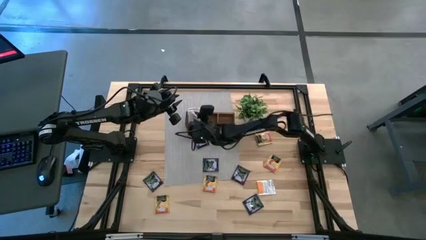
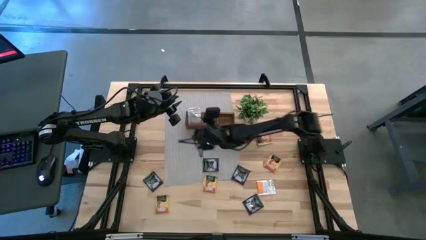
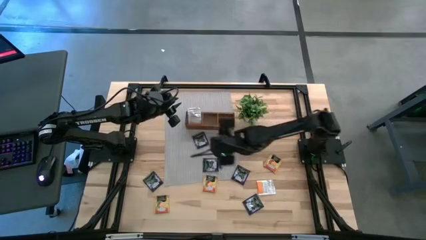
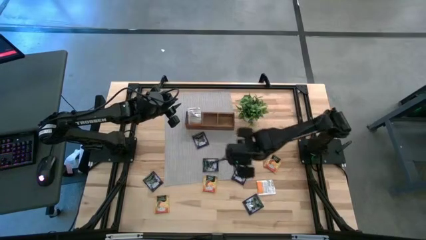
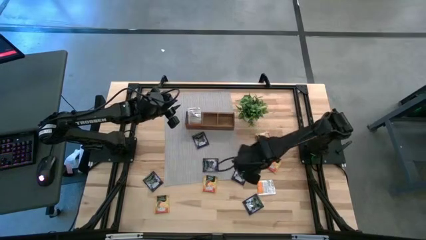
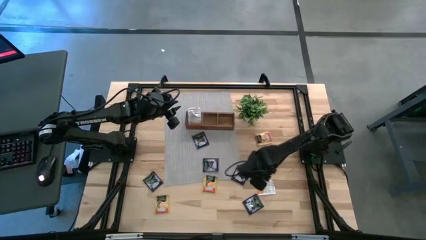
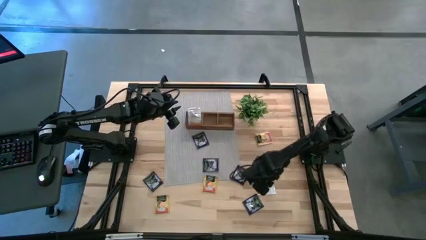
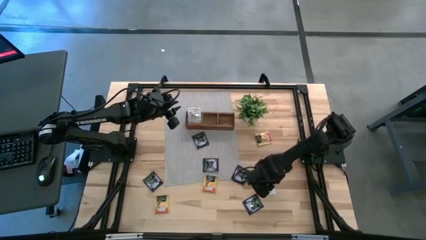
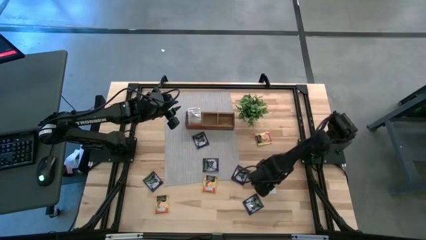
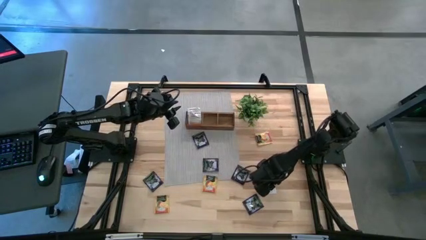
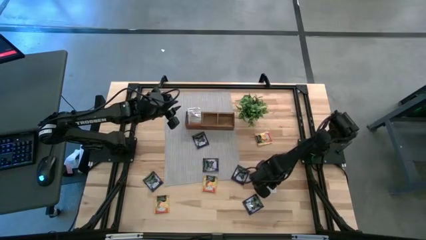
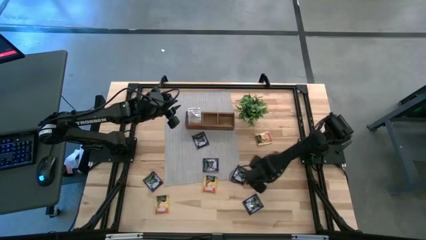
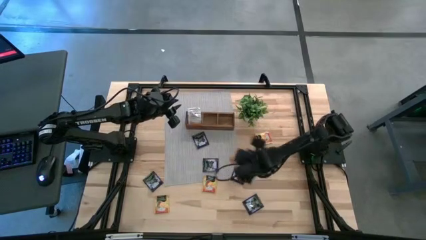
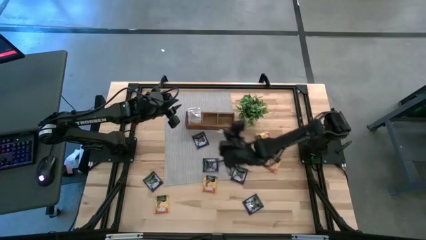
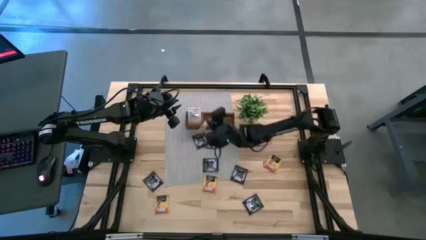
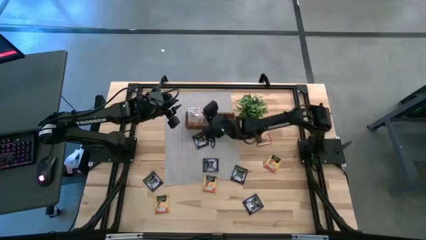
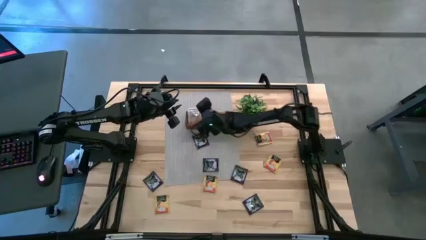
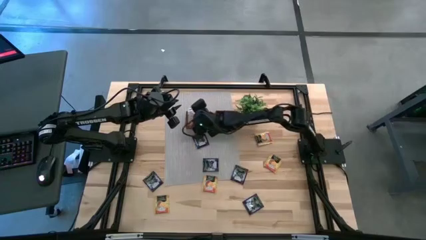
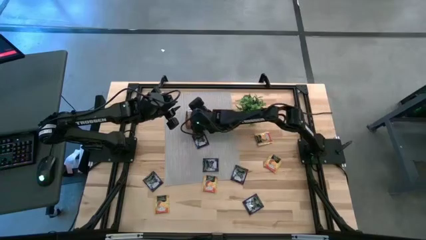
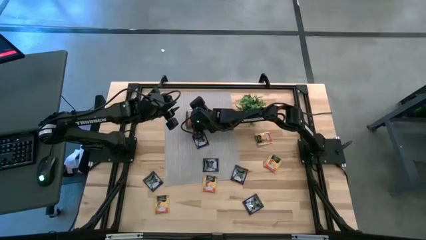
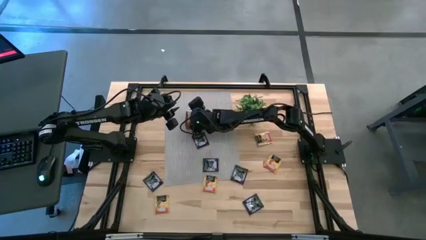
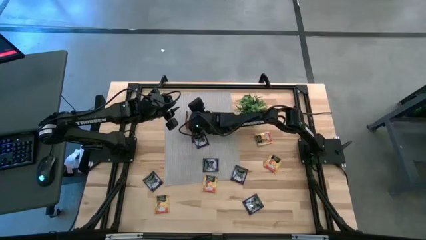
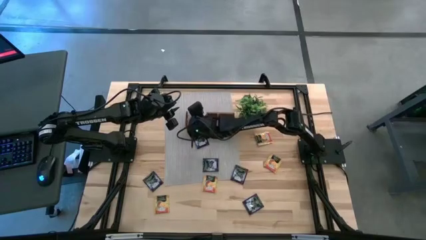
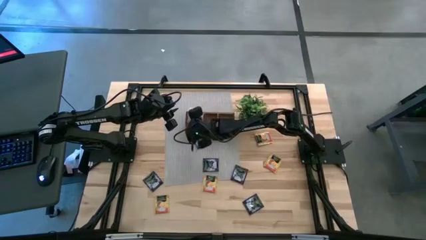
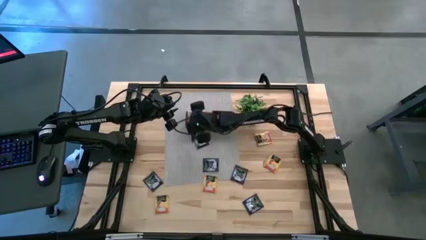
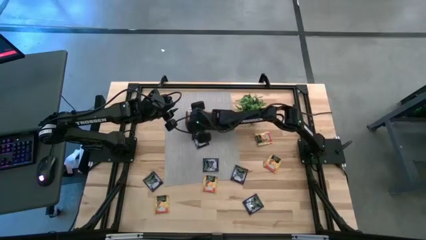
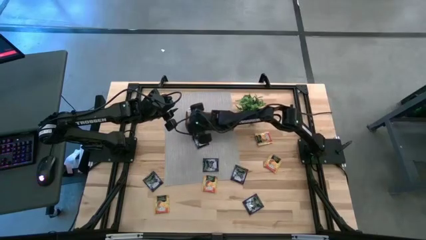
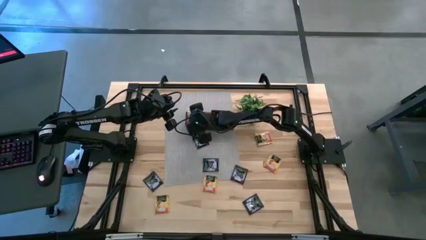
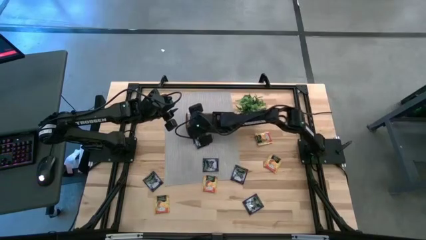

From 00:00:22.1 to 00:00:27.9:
Task: Pick & Place Tea
Put the white tea bag in the left section of the brown wooden organizer

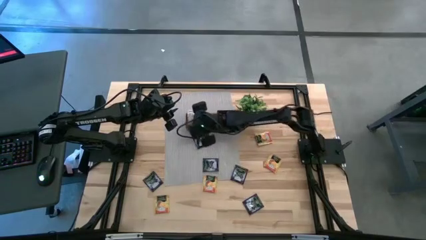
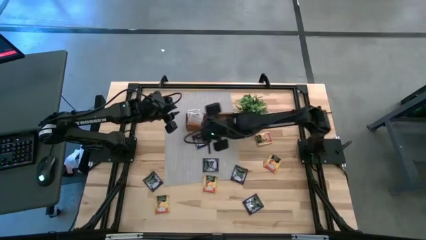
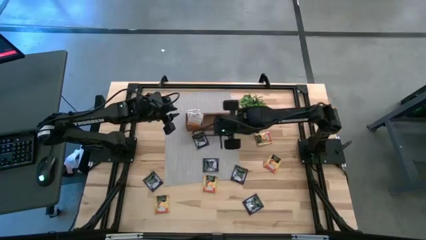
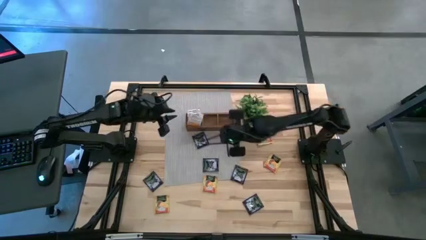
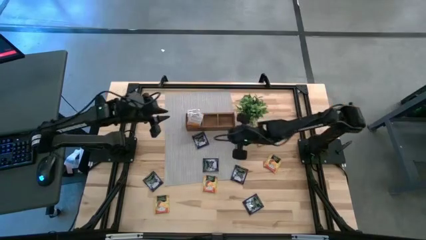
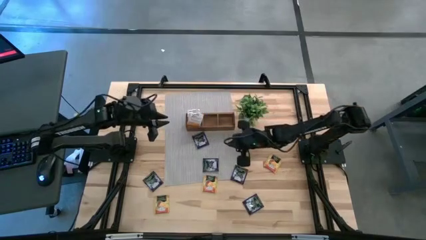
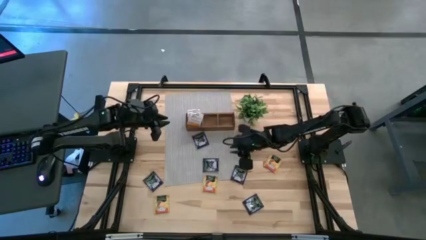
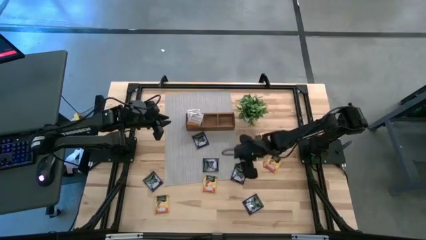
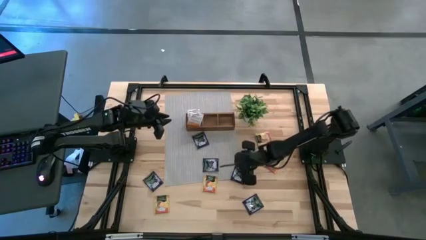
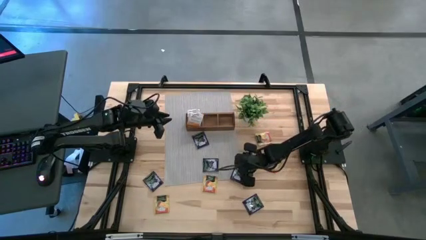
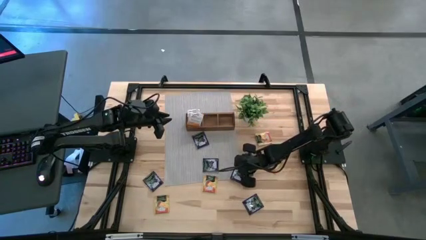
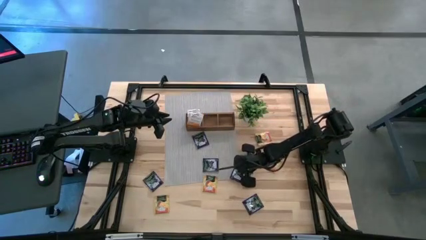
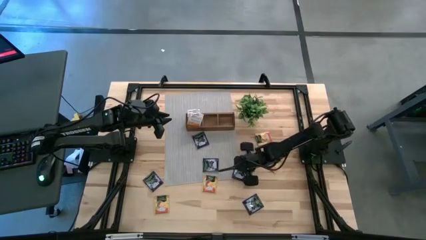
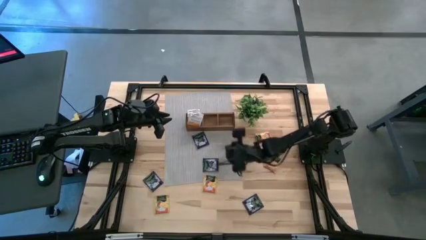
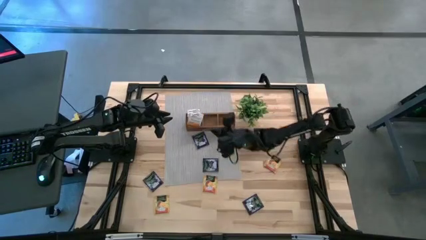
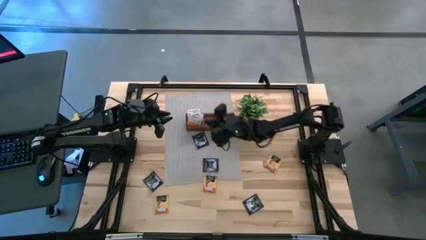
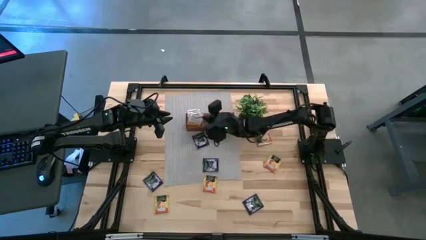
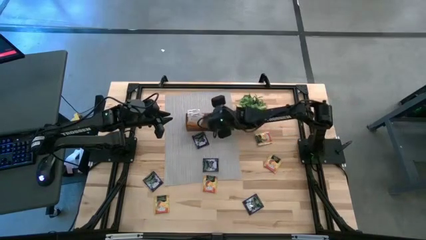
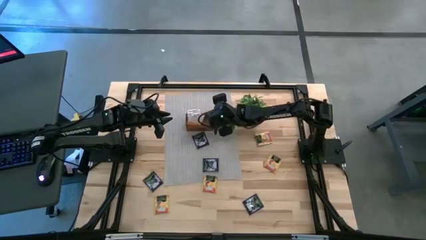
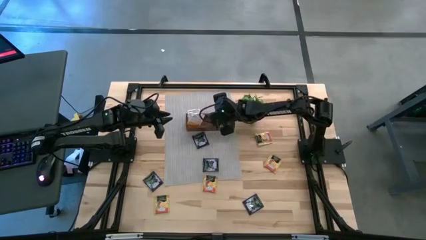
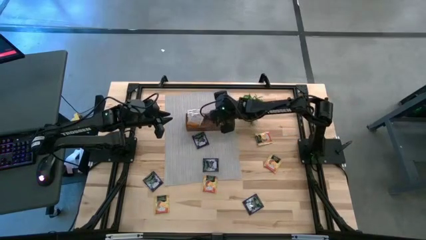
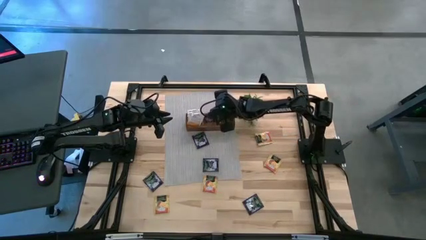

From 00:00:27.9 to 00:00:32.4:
Put the black tea bag in the middle section of the brown wooden organizer

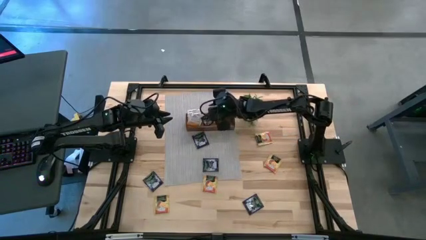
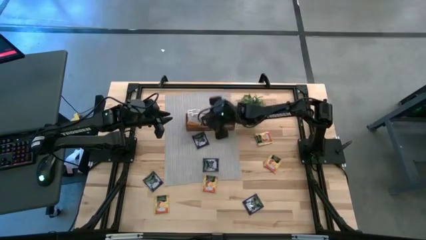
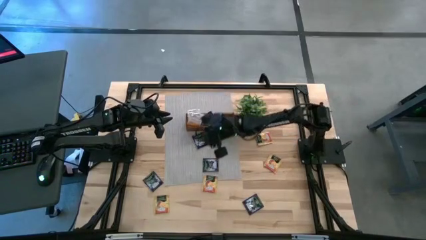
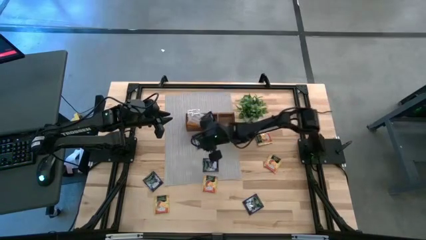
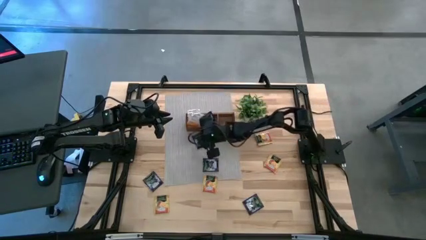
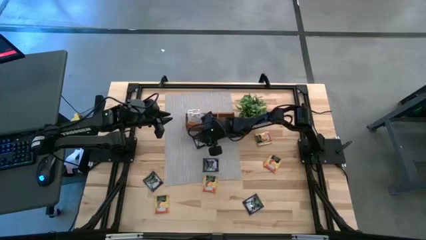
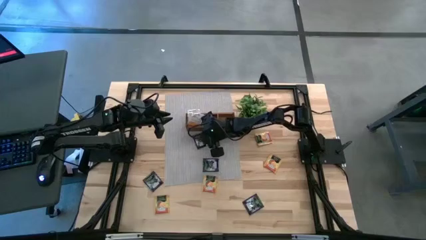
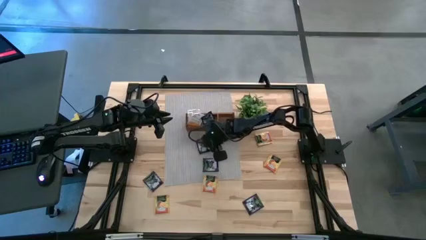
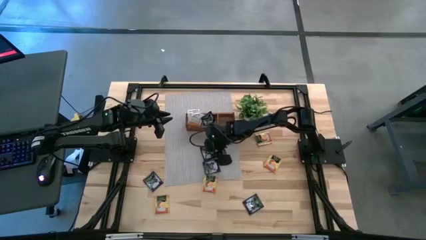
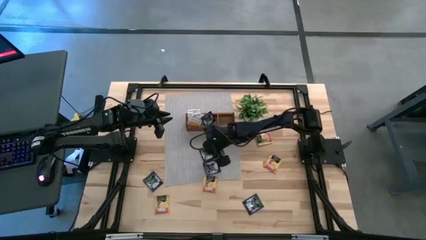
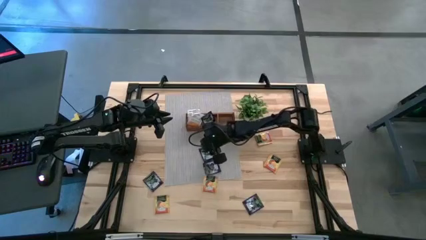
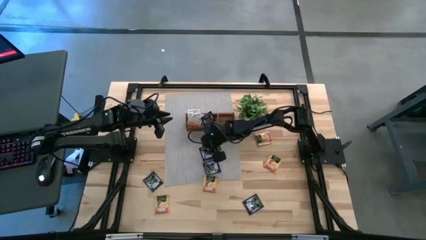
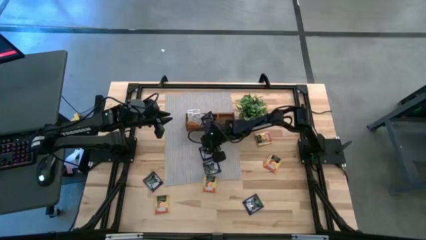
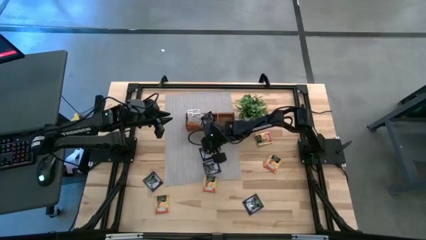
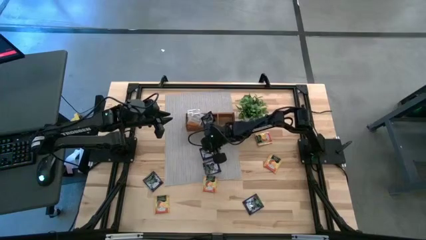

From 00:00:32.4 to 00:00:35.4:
Put the black tea bag in the middle section of the brown wooden organizer

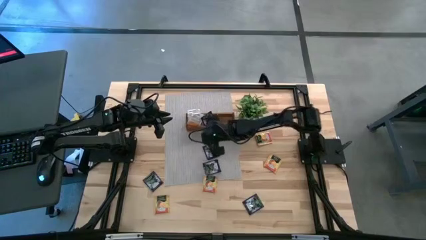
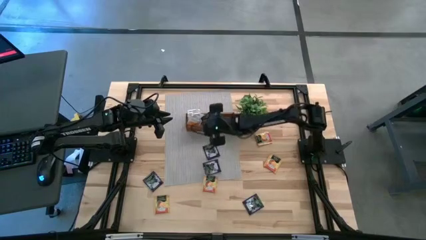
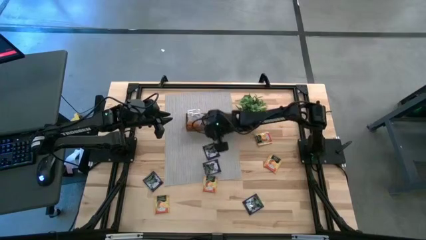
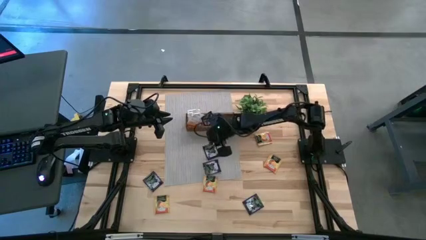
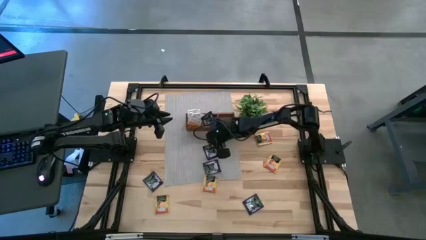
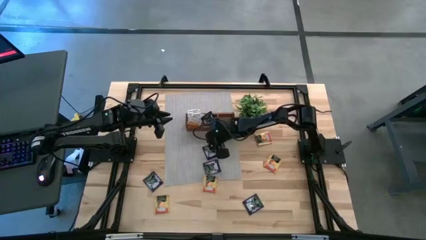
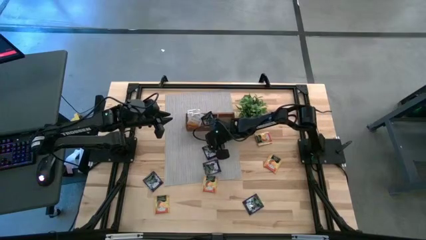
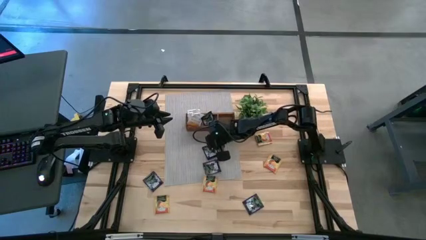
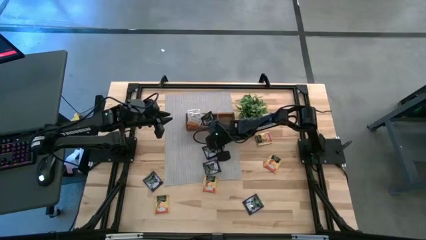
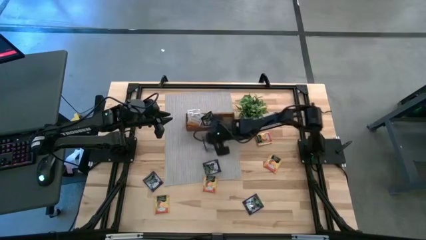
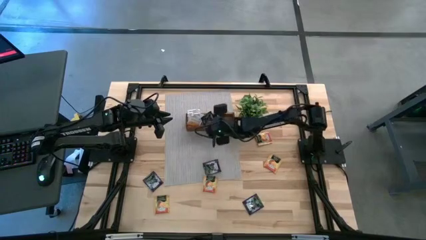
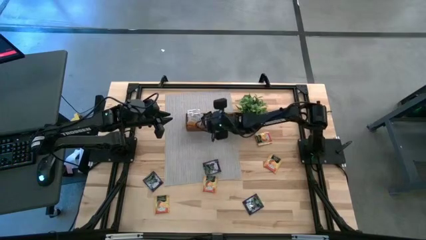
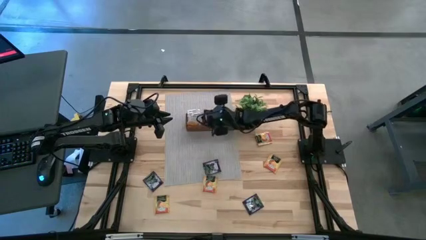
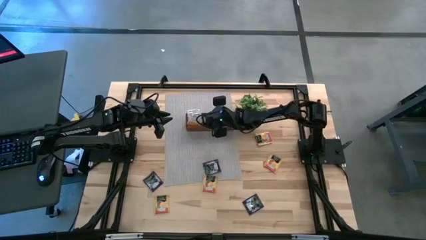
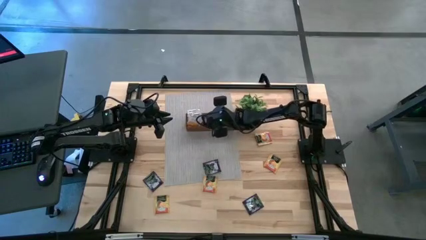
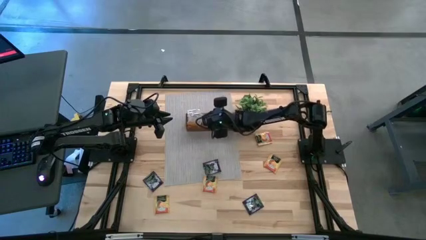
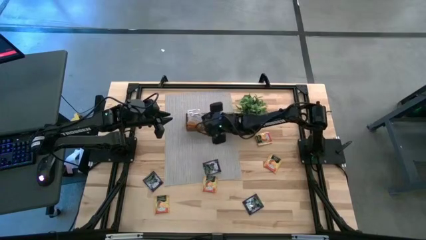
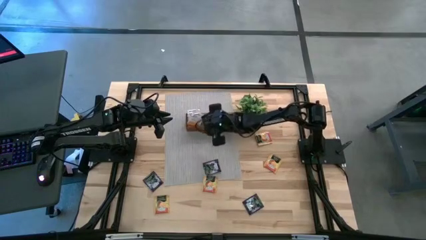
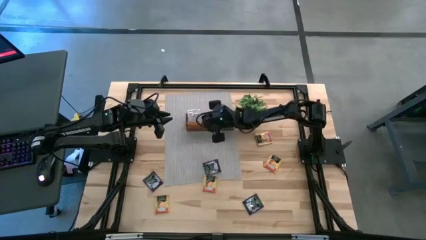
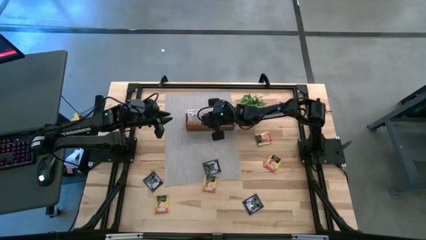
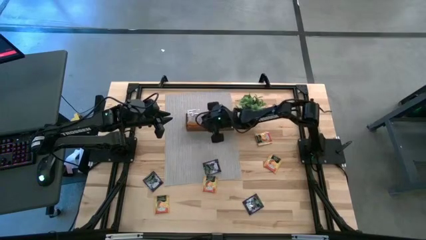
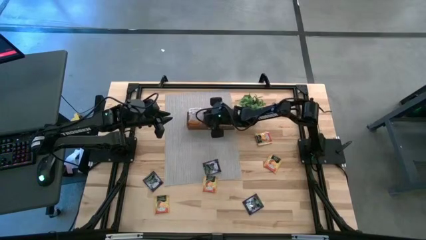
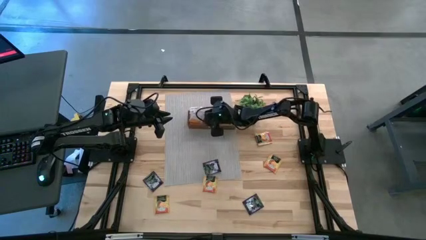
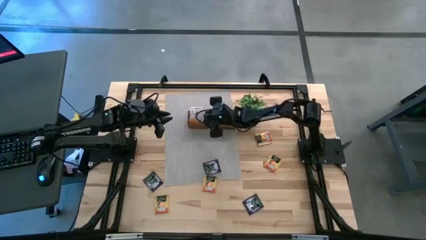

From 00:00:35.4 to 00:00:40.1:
Put the black tea bag in the middle section of the brown wooden organizer
